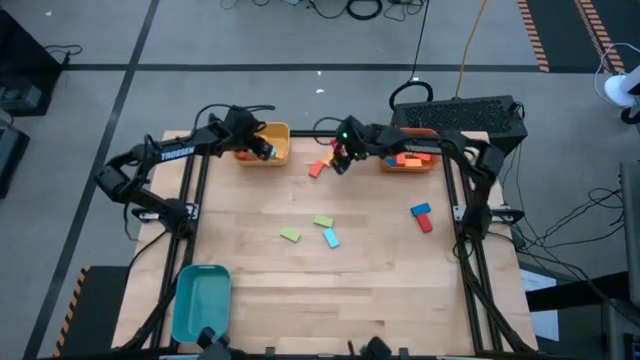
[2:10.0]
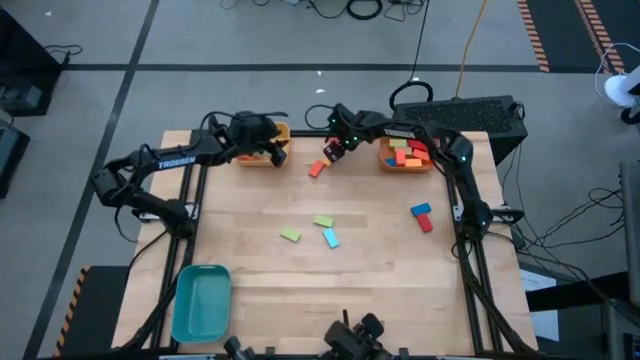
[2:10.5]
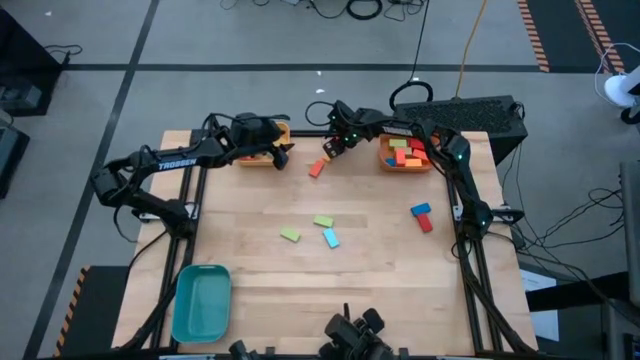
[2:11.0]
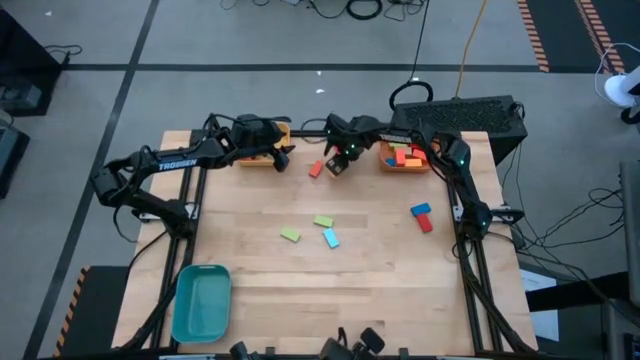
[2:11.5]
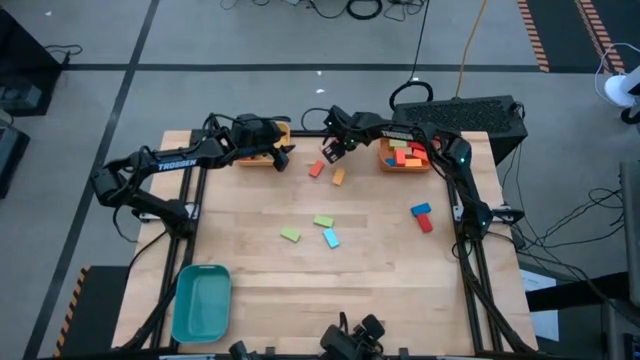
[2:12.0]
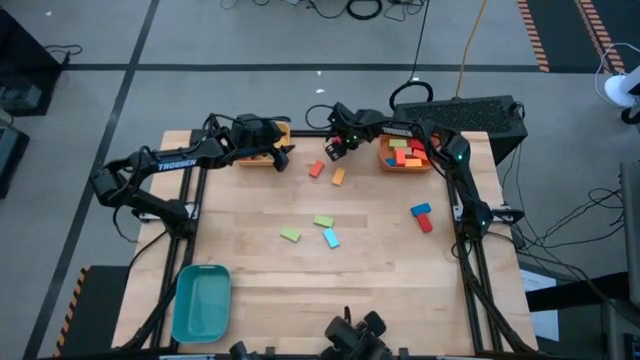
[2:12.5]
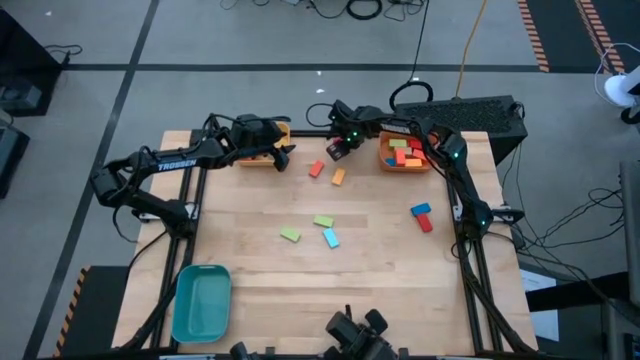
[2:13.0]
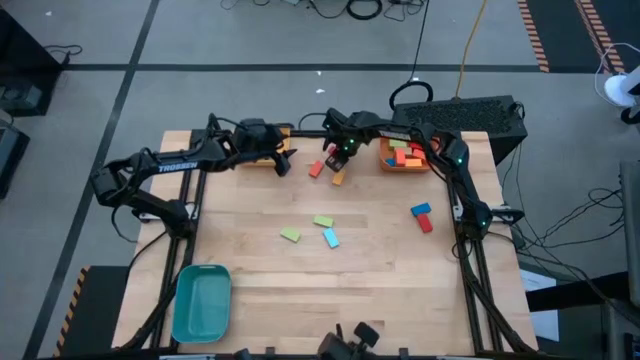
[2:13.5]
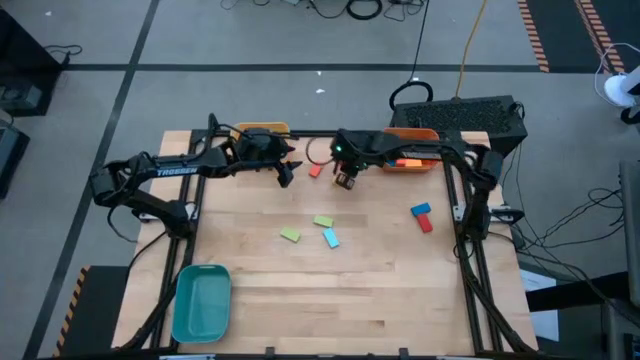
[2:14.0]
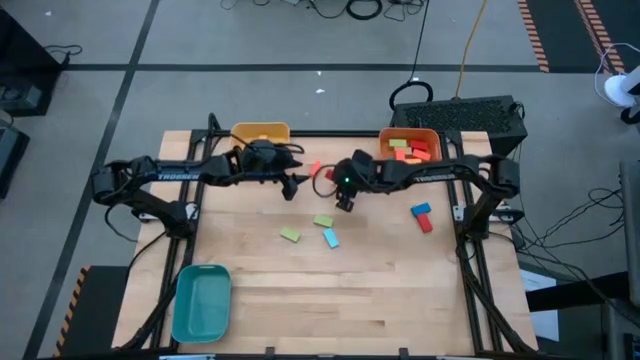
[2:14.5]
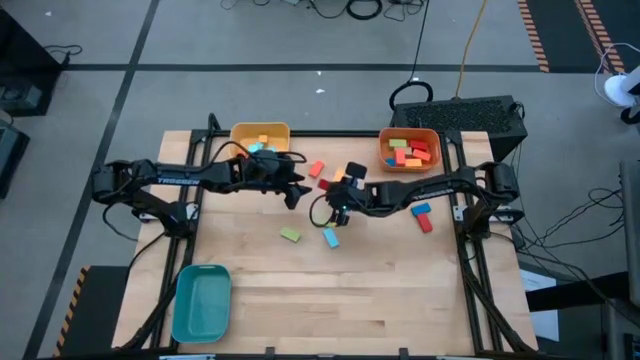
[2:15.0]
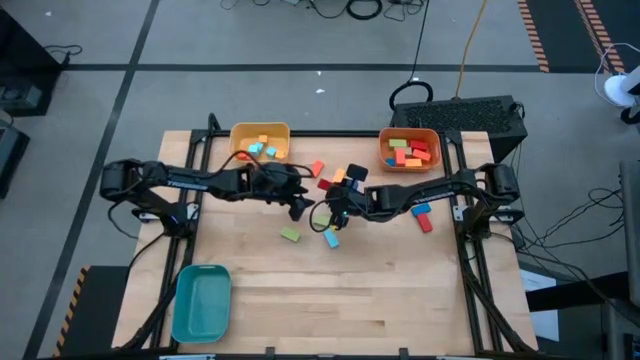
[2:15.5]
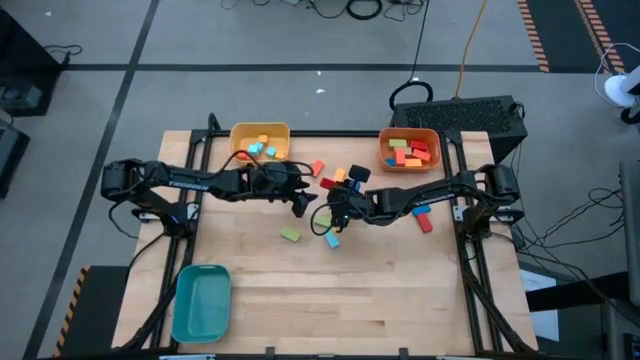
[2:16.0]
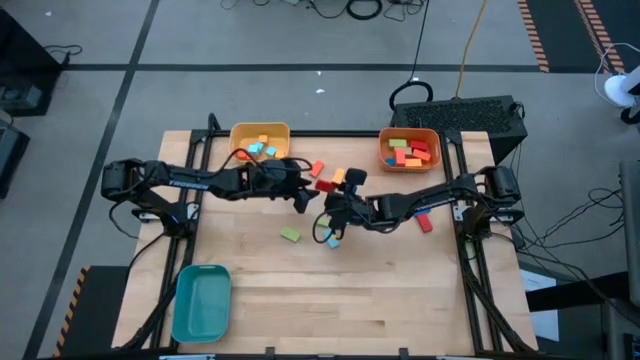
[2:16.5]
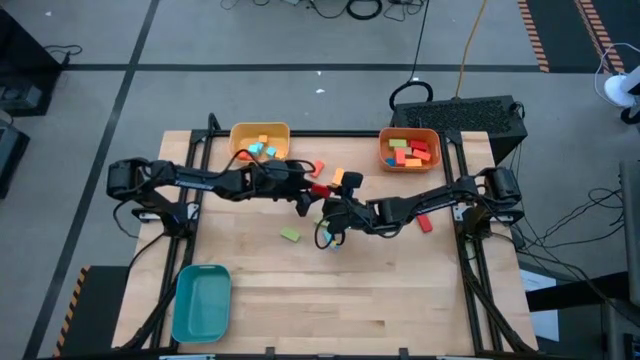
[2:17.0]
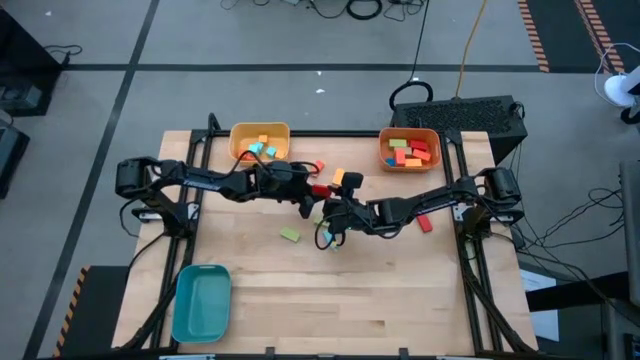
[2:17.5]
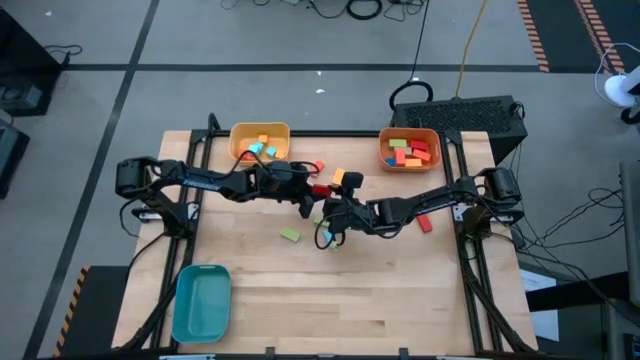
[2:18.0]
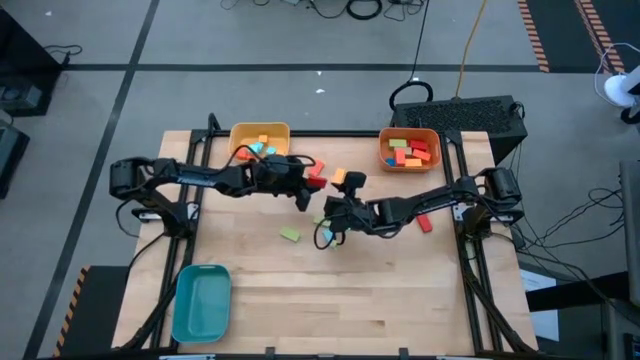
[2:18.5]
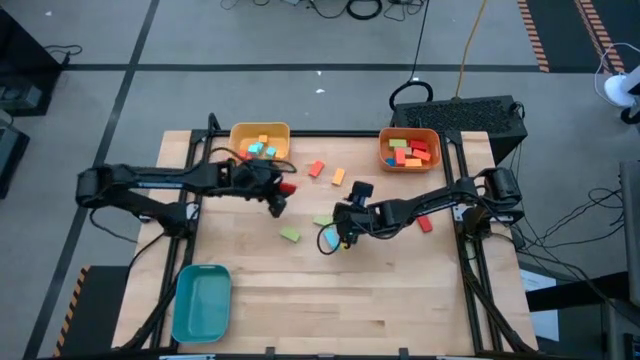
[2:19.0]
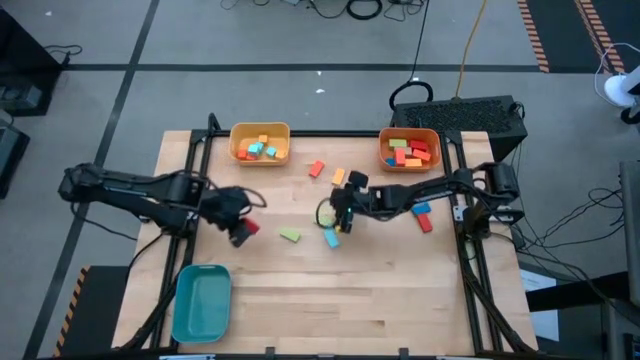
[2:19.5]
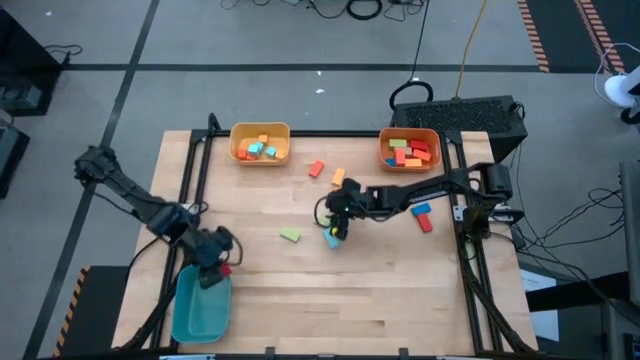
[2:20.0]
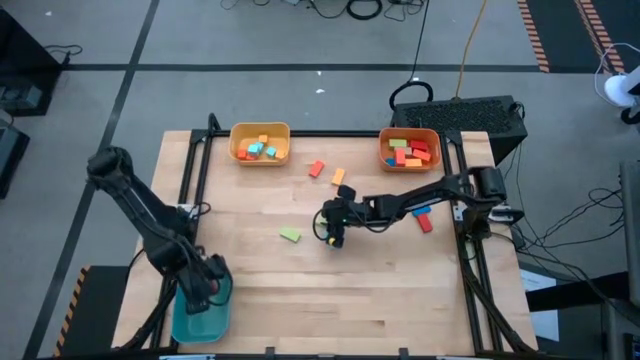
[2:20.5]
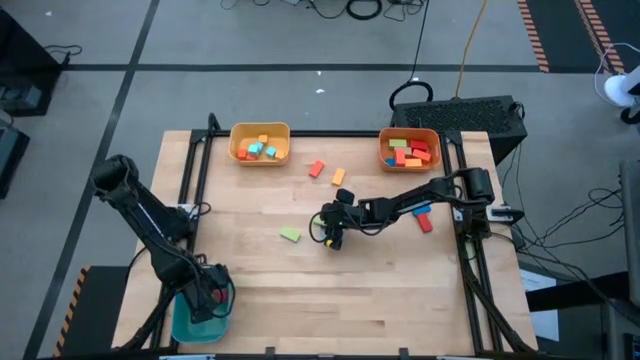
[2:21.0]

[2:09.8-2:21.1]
Task: Sort blocks by size
Put the large red block into the blue bin

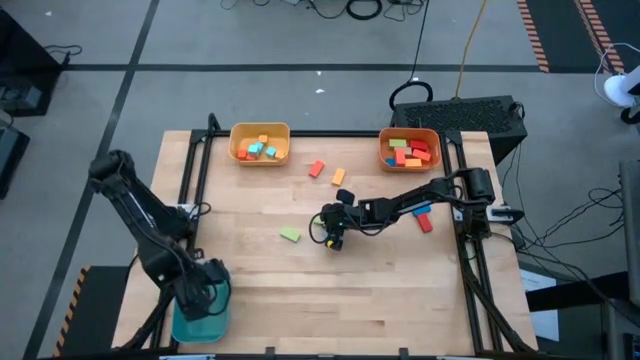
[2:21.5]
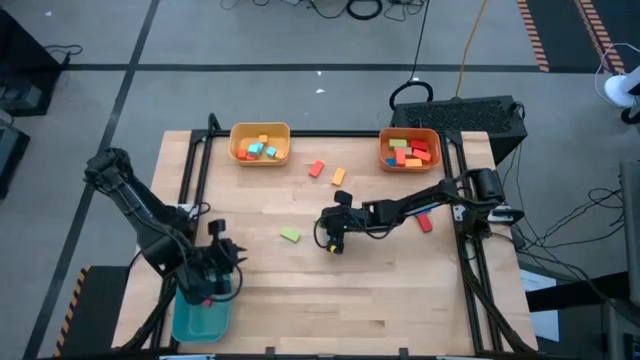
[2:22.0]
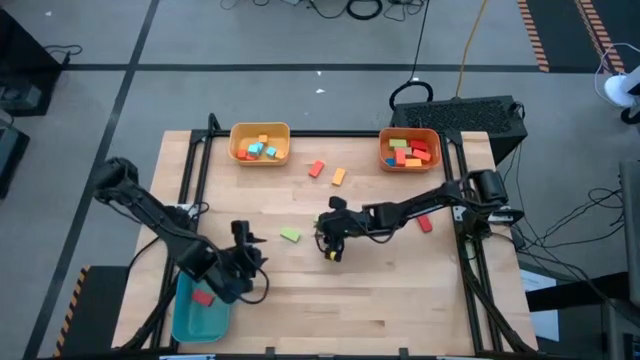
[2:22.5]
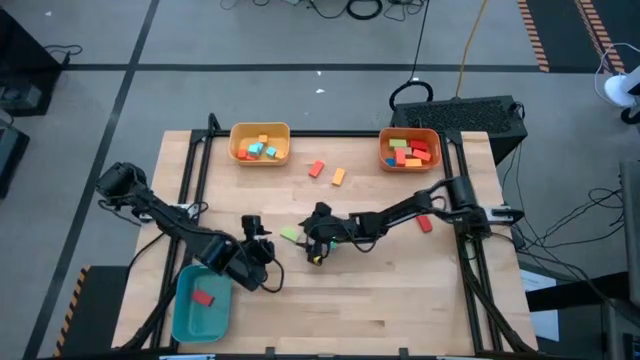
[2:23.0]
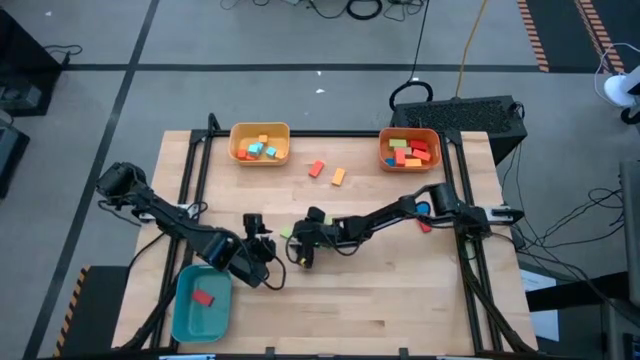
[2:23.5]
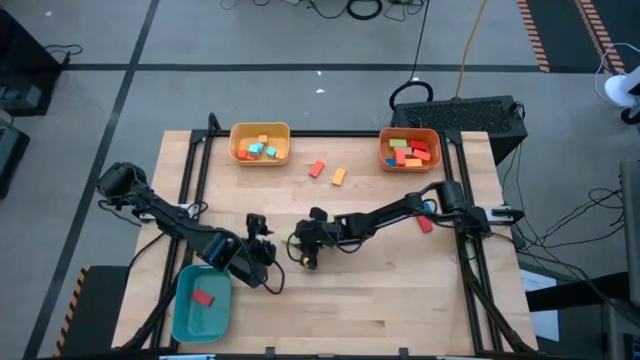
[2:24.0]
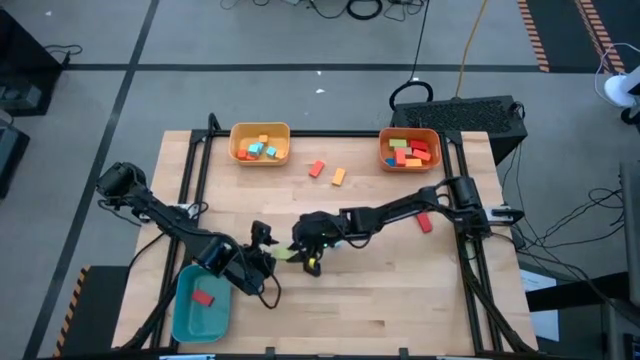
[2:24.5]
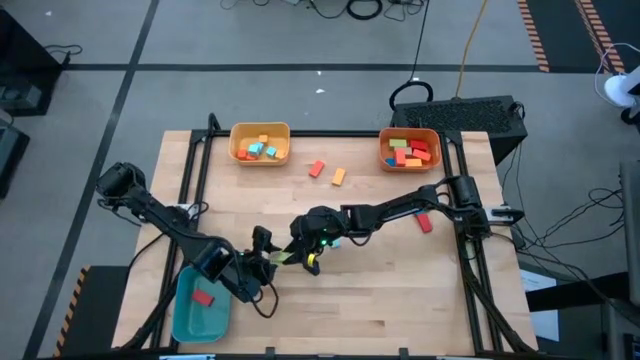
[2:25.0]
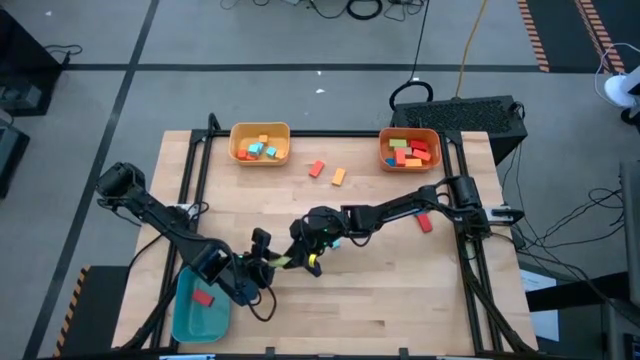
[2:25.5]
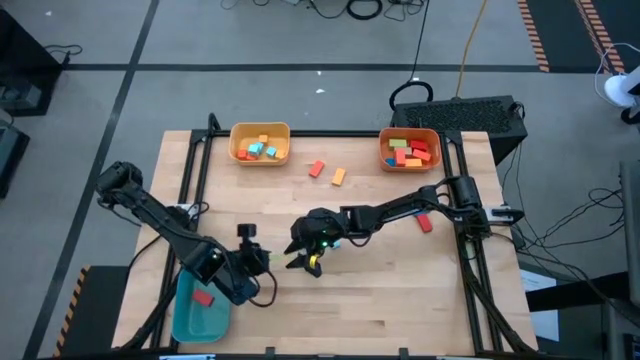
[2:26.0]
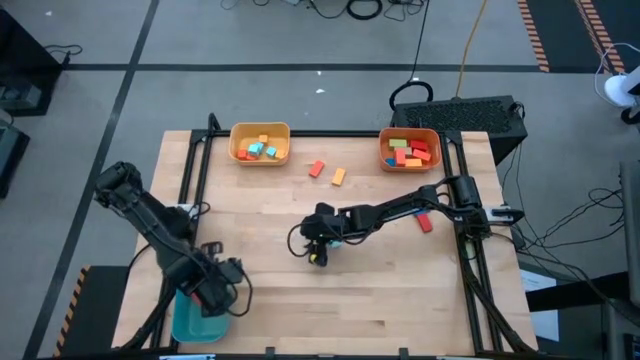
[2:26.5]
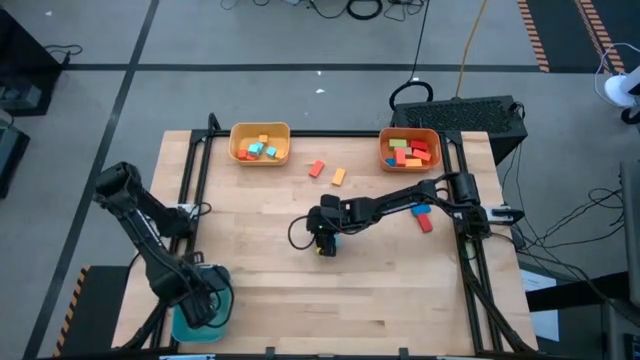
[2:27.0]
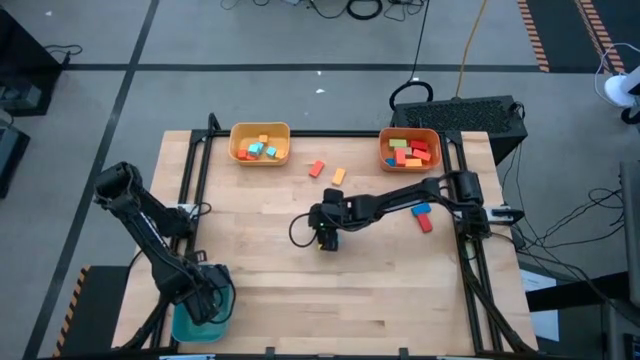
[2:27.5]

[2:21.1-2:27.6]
Put the large green block into the blue bin
